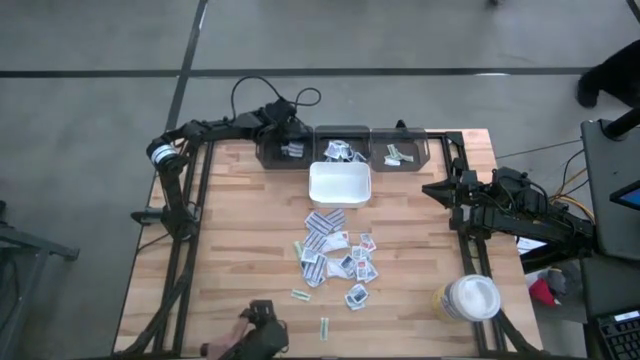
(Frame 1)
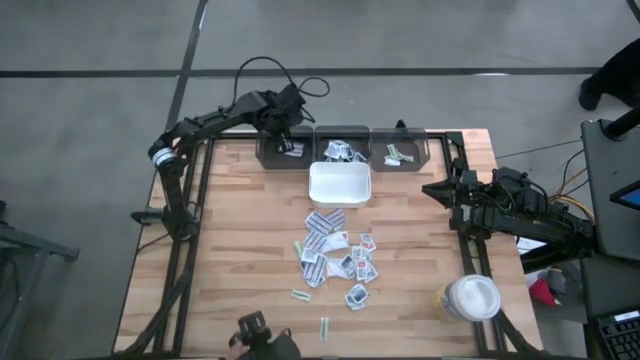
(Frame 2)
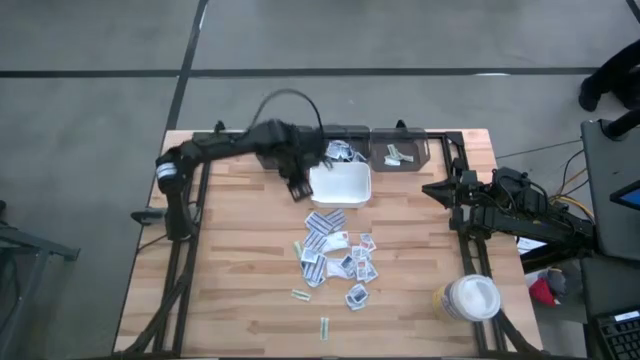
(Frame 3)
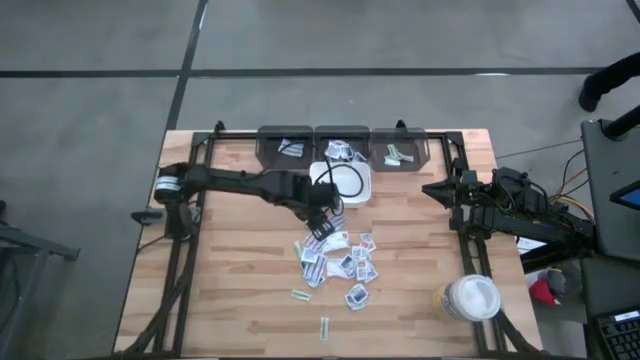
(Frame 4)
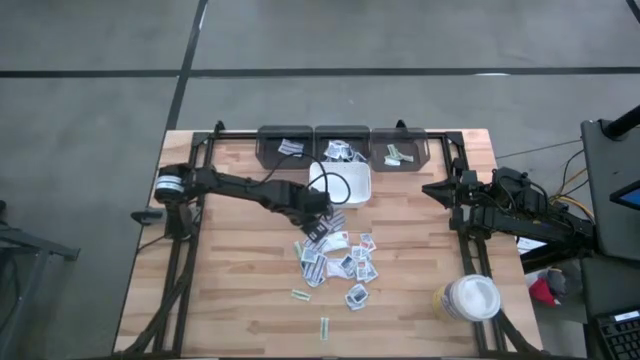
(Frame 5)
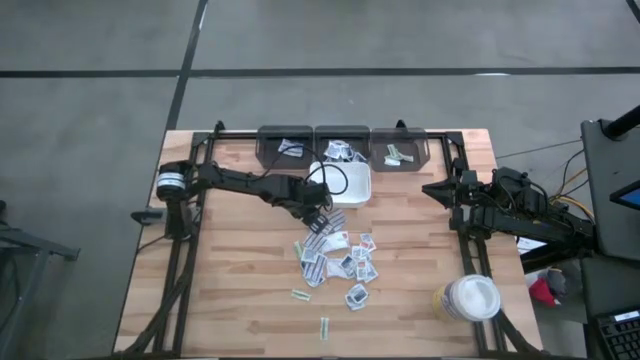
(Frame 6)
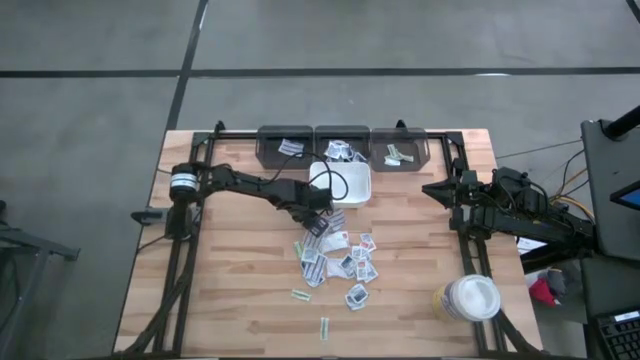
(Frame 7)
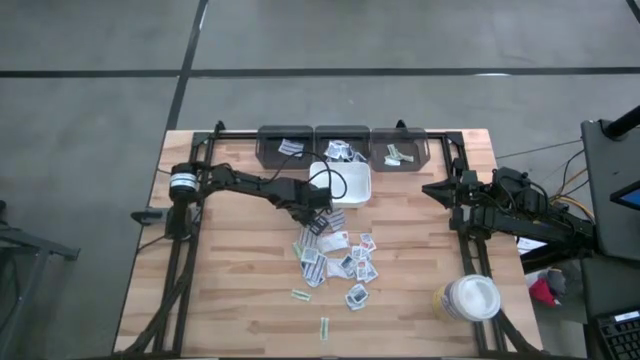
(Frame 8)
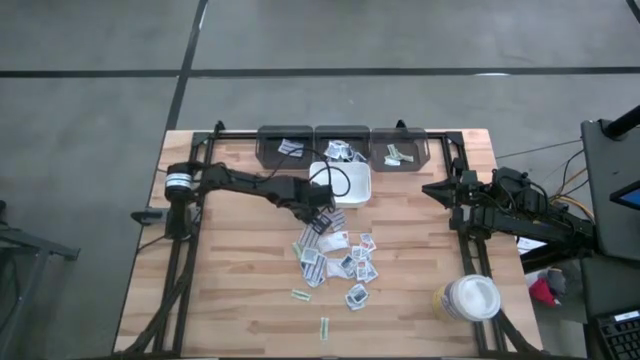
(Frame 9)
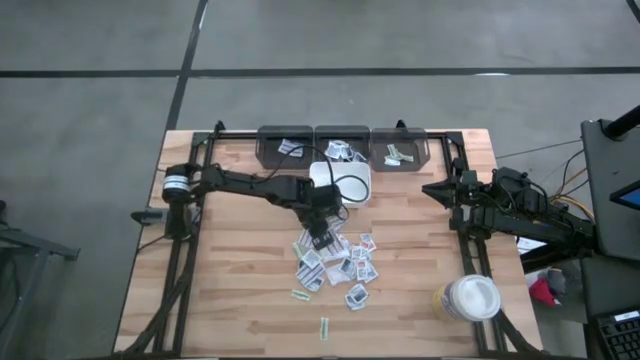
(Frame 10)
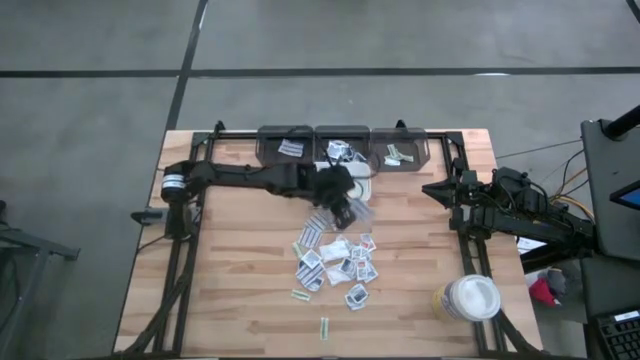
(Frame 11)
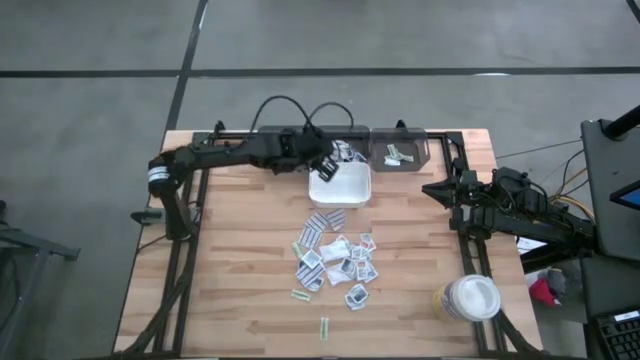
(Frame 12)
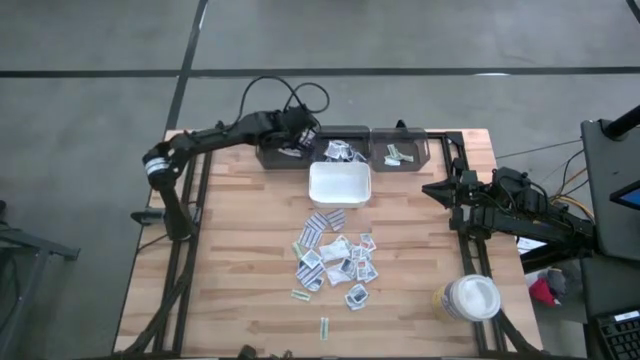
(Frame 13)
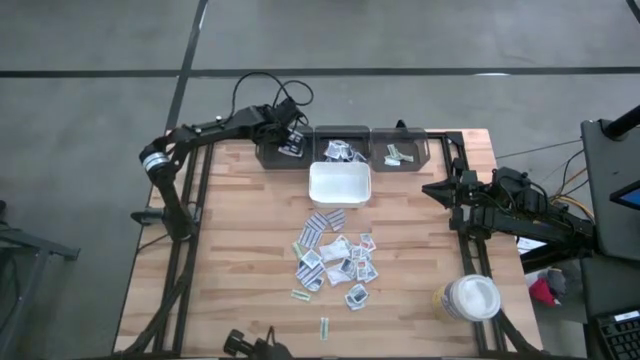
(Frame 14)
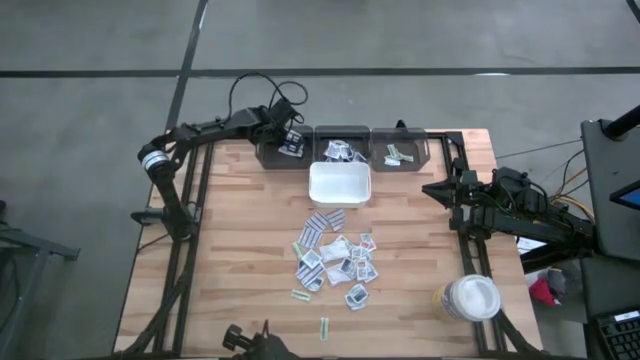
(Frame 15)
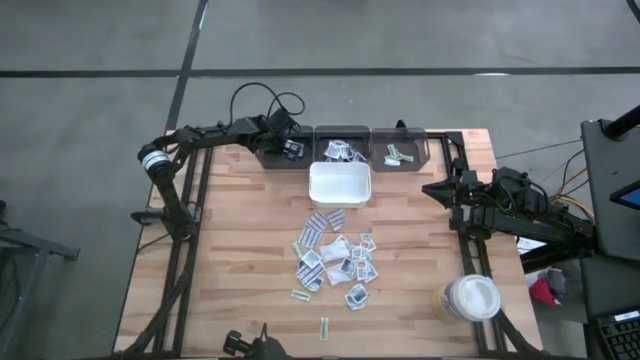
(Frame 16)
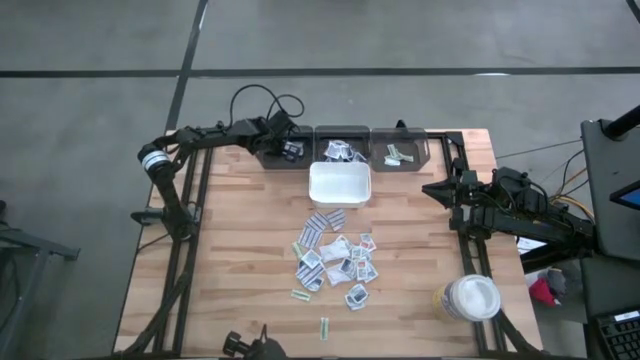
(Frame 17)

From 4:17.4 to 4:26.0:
Task: Pick & Place First Aid Supplies
Put the blue bandage pack into the left gray bin

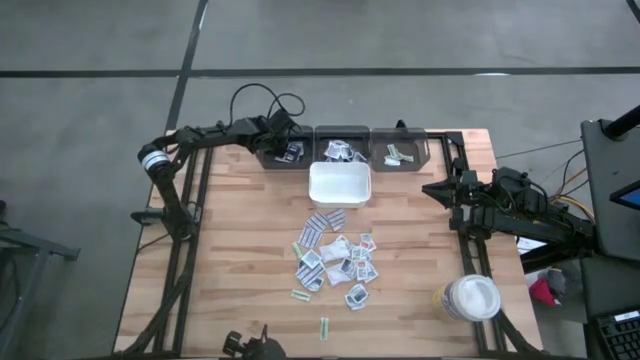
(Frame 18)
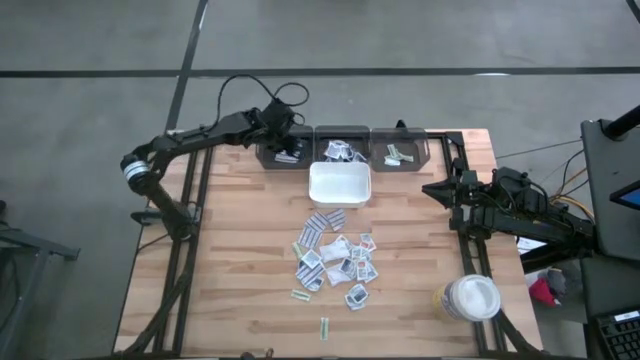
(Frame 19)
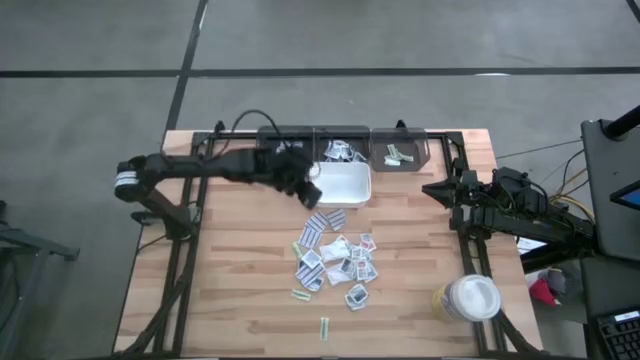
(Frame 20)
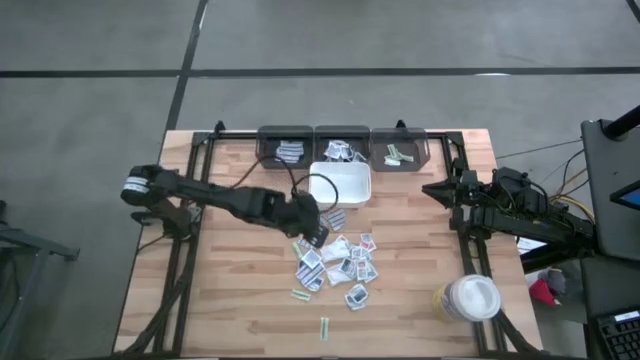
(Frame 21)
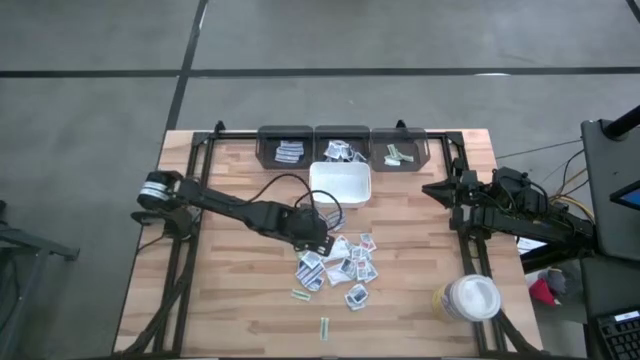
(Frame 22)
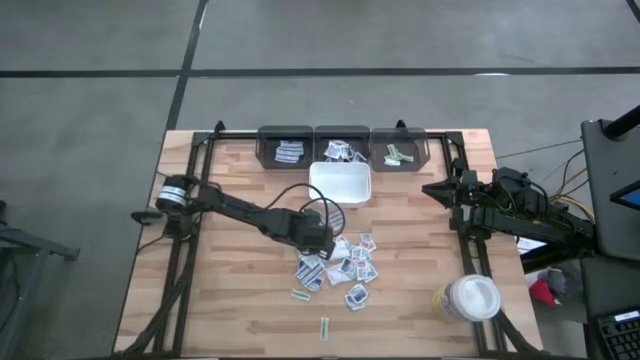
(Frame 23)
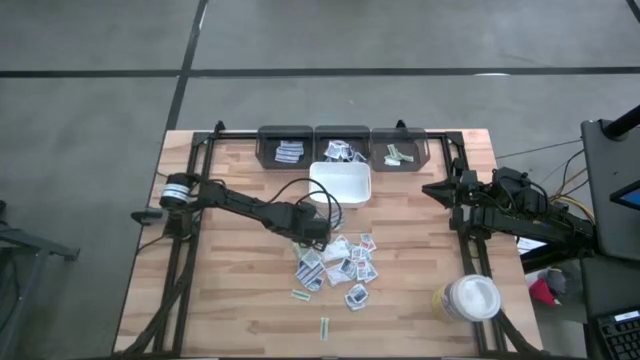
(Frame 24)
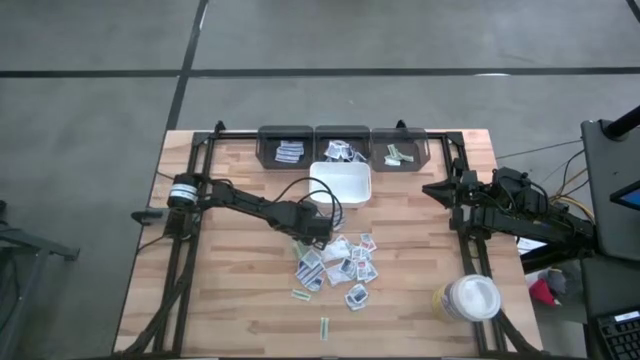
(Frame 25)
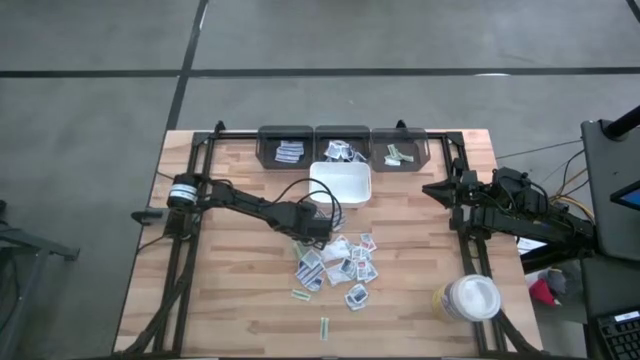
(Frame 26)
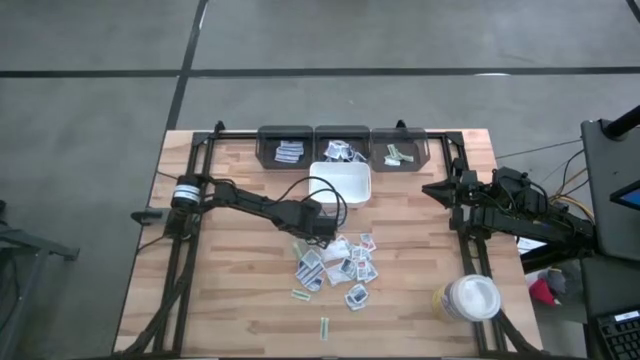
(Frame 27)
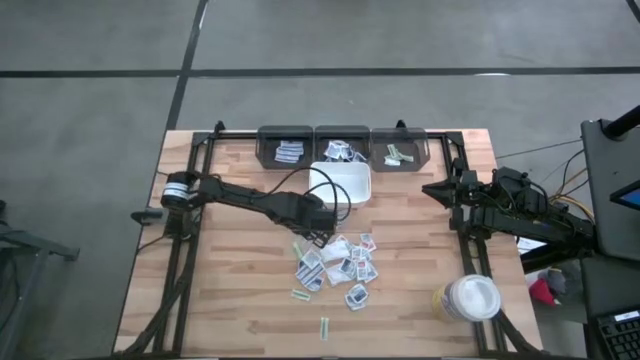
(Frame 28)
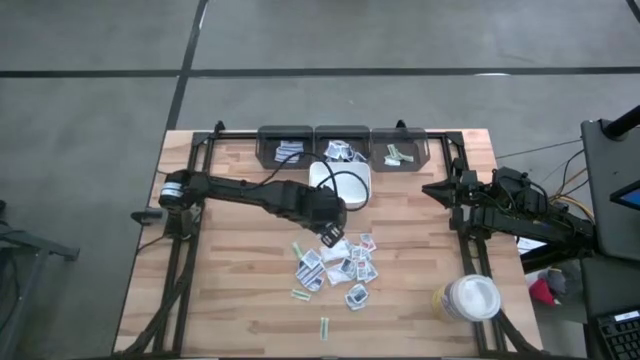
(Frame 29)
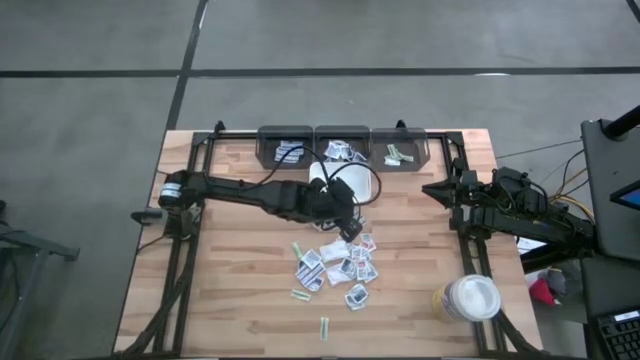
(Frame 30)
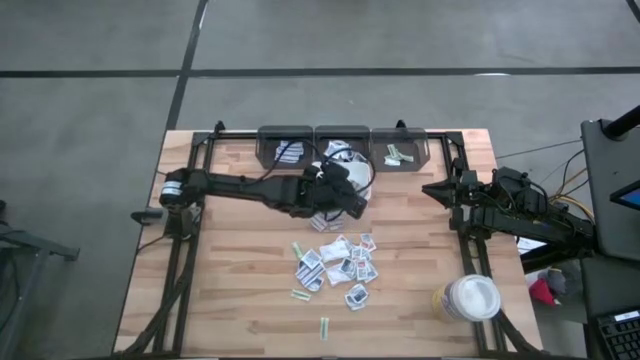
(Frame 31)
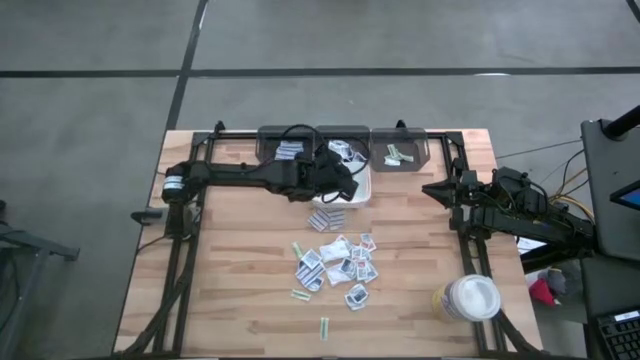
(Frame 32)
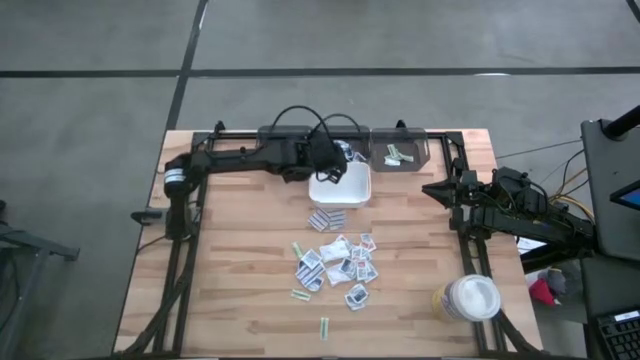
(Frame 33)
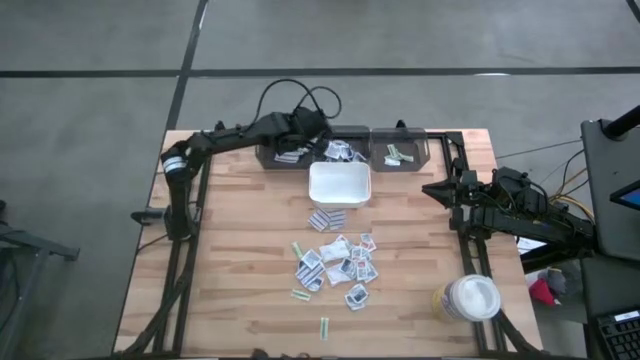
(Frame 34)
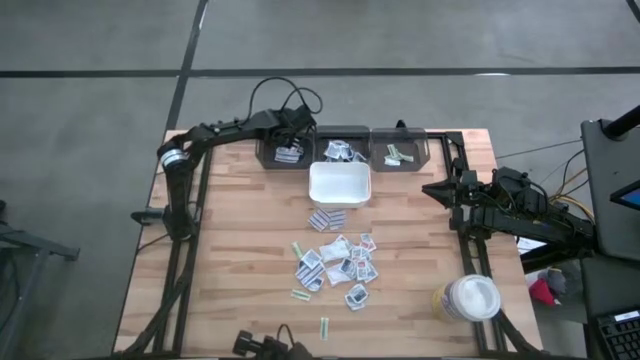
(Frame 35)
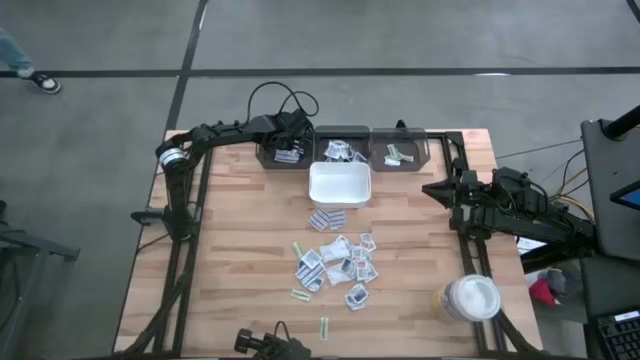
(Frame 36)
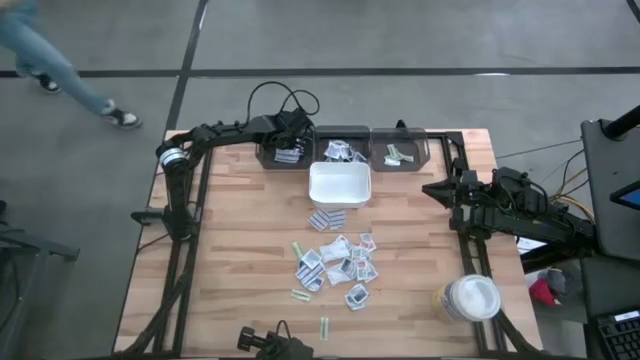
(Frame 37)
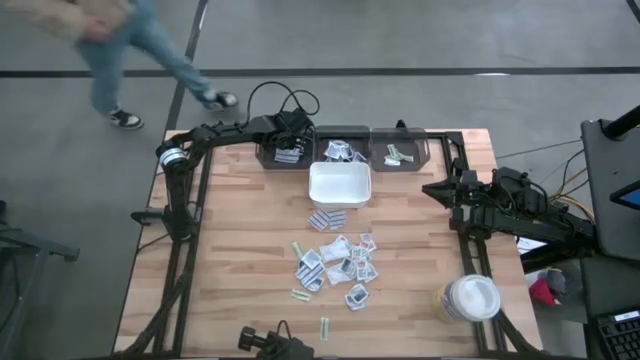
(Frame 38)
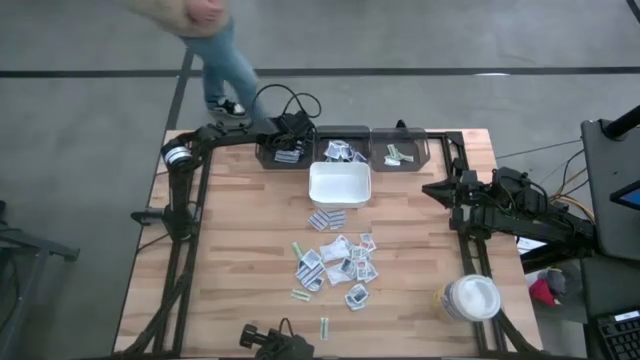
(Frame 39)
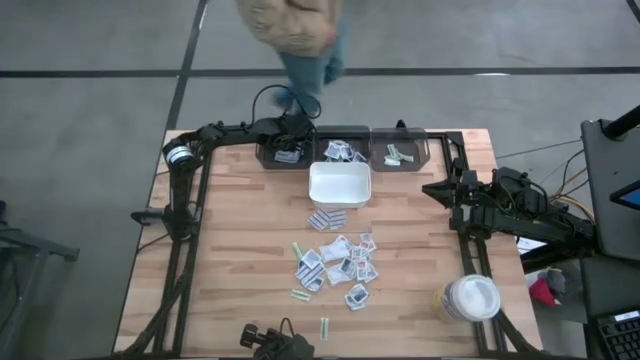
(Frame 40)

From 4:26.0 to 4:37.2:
Put the blue bandage pack into the left gray bin

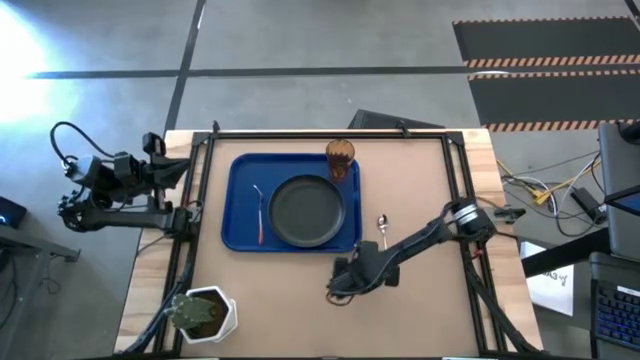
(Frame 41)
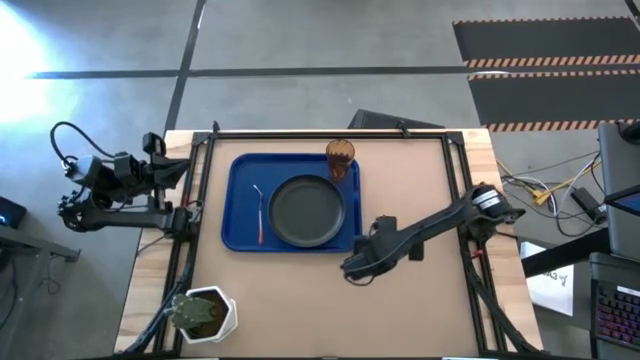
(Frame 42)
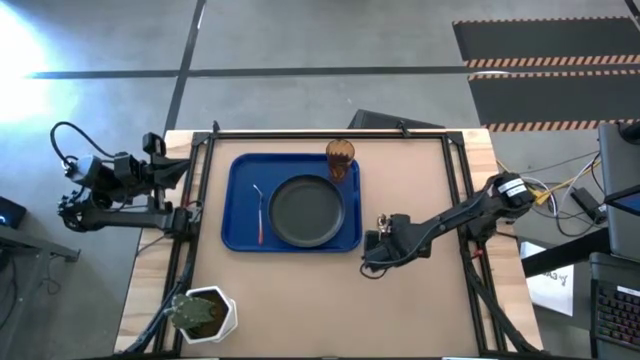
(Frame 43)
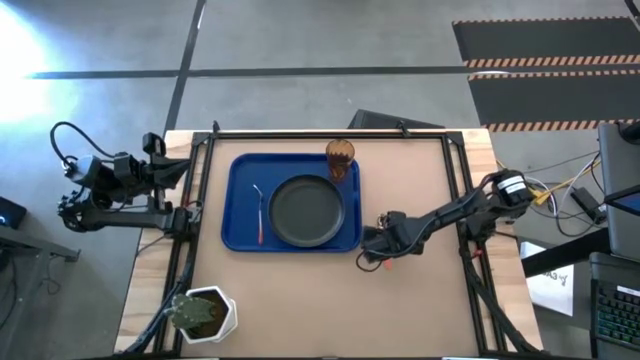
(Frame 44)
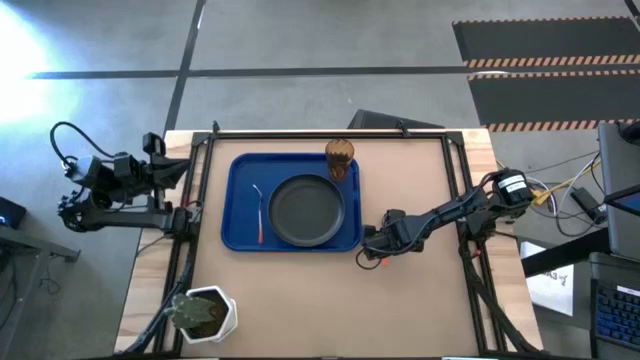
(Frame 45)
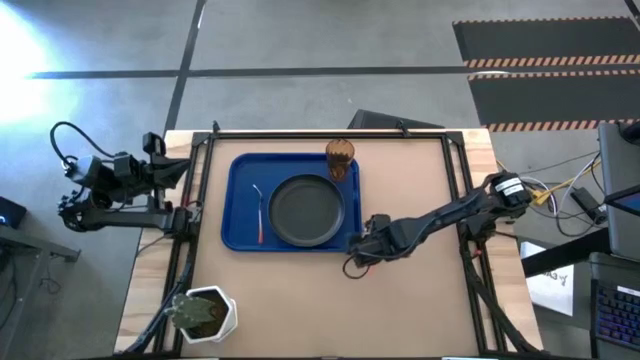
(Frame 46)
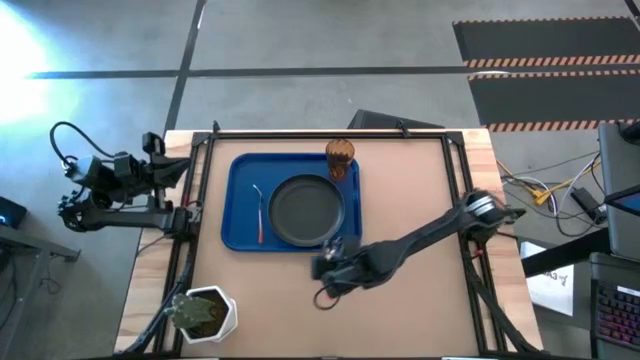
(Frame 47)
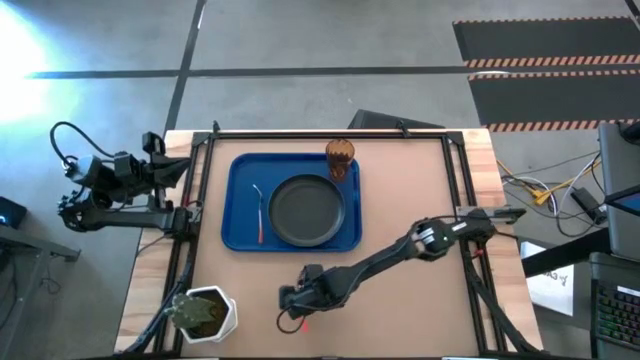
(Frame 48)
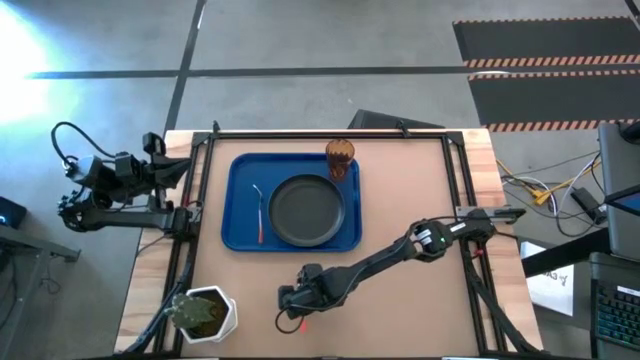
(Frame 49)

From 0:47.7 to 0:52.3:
Task: Pick and place plate/cup/fork/spoon on tray
Move the orange spoon to the bottom left of the table
